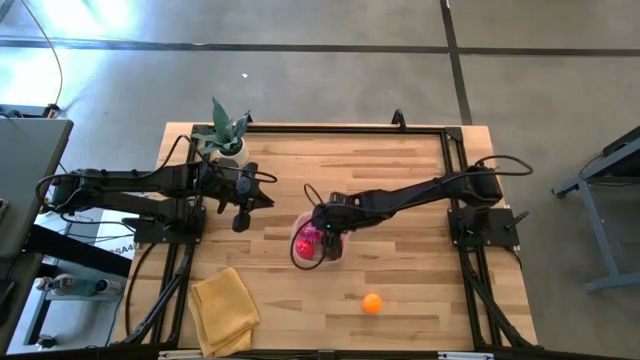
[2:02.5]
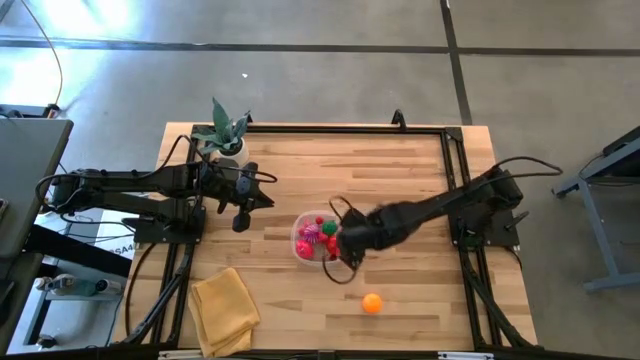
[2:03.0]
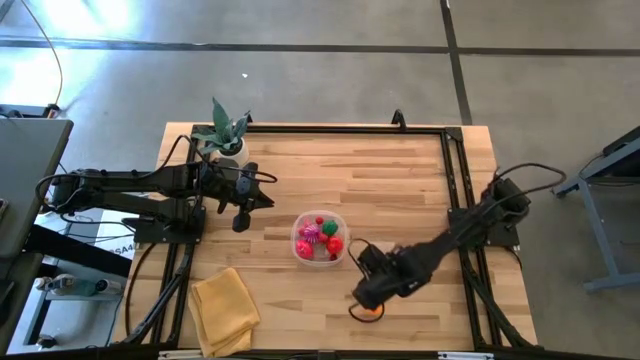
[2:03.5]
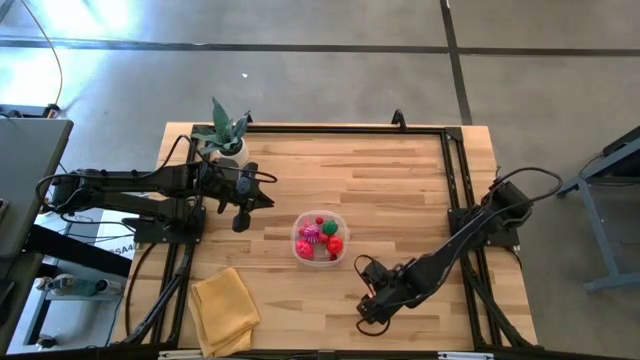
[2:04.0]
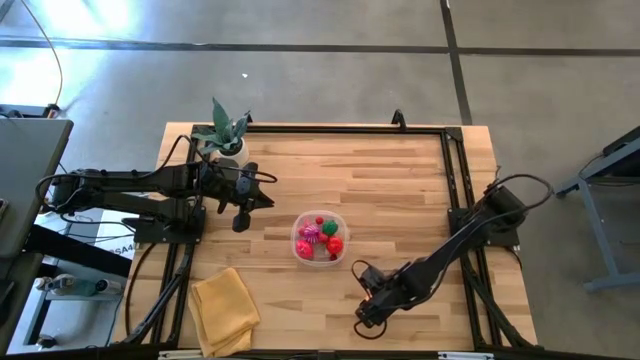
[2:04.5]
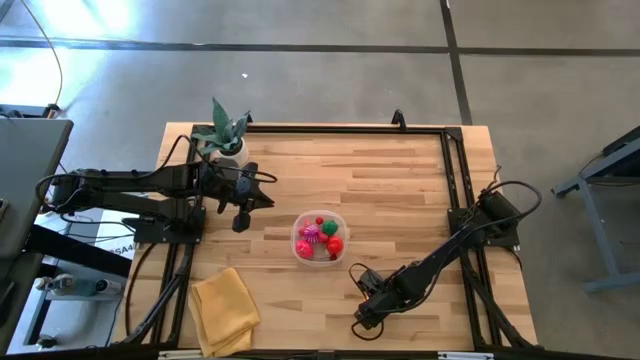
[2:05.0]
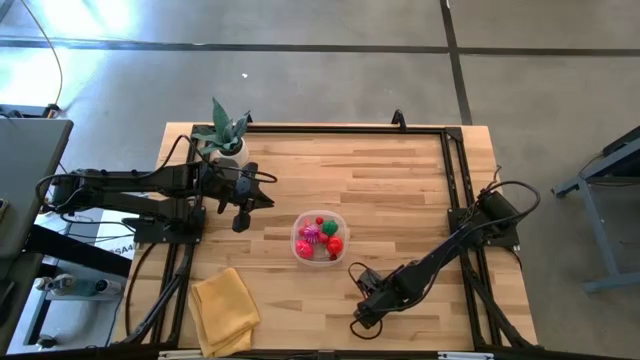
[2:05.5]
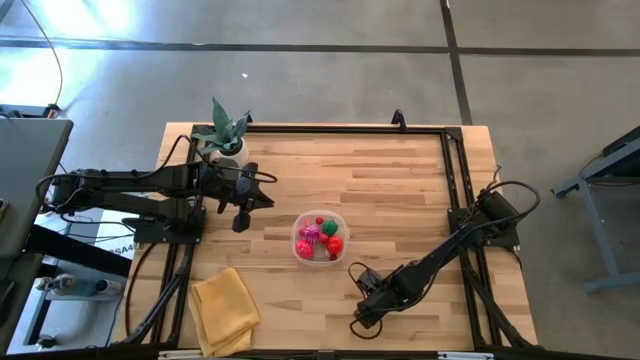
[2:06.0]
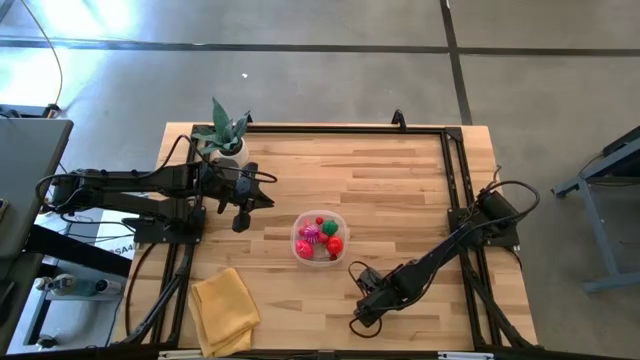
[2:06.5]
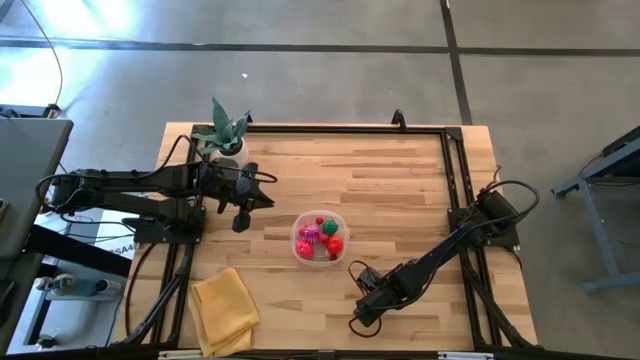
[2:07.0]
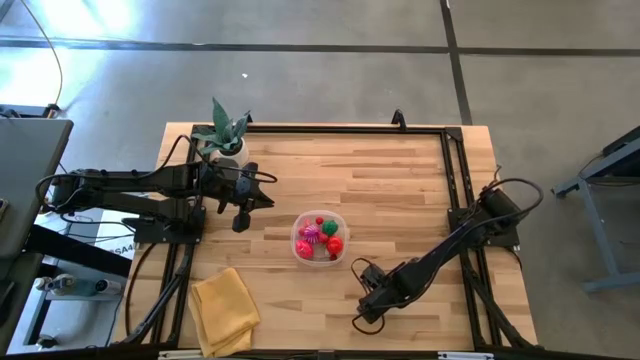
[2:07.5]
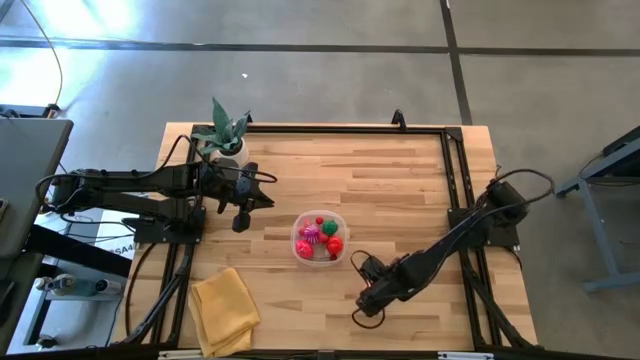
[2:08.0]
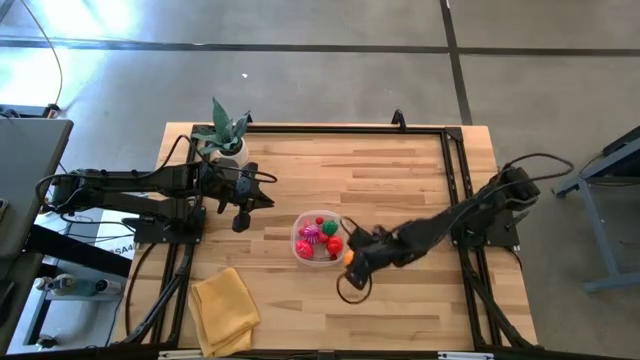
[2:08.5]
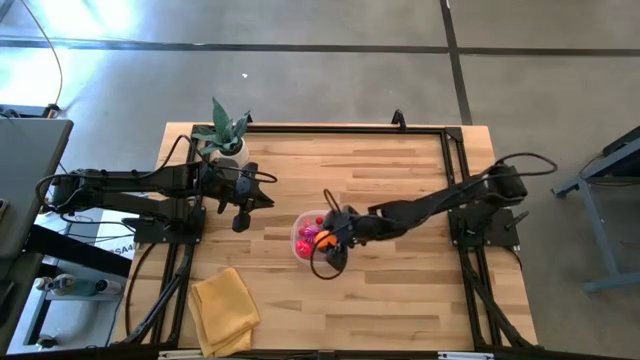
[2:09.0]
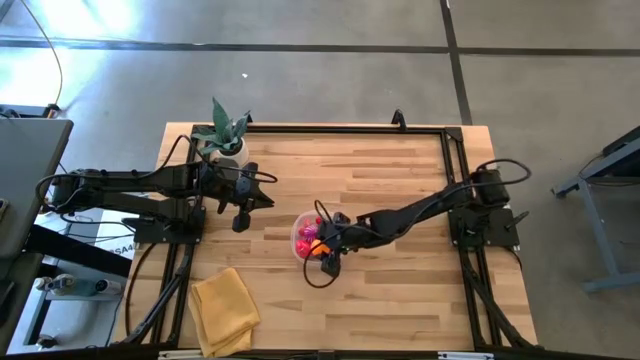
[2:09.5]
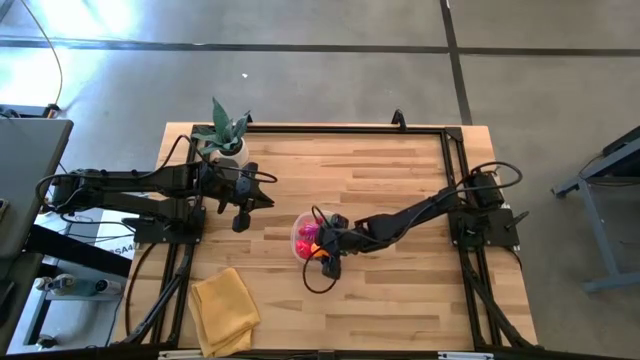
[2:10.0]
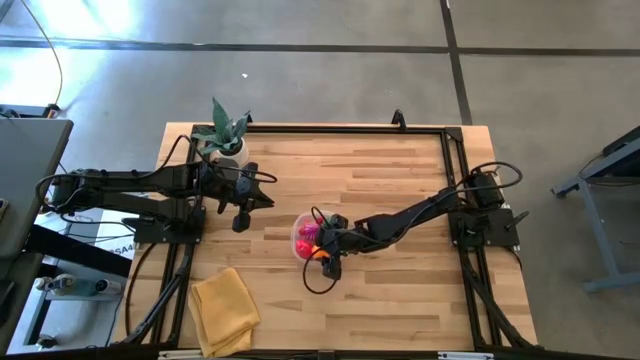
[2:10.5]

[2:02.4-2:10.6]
Task: Pick and placing Produce into tupperware
Put the orange into the transparent container

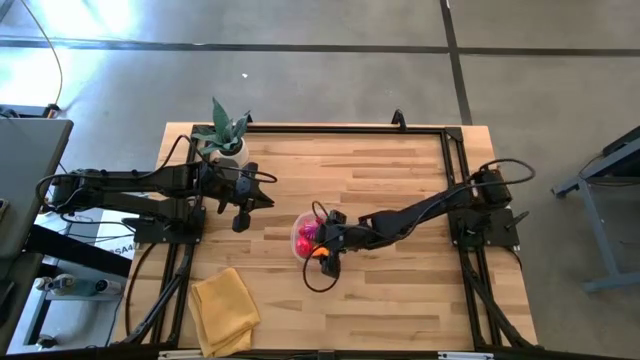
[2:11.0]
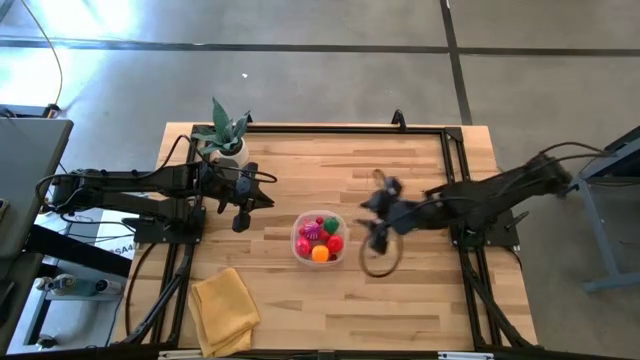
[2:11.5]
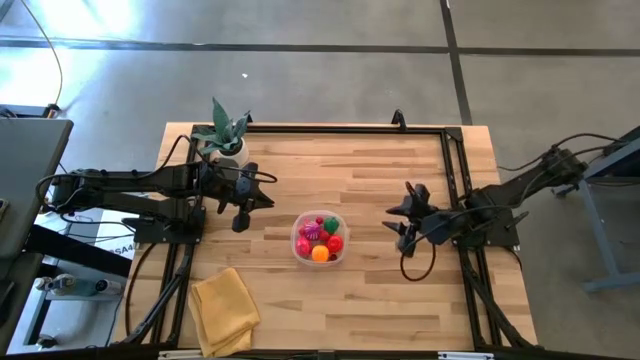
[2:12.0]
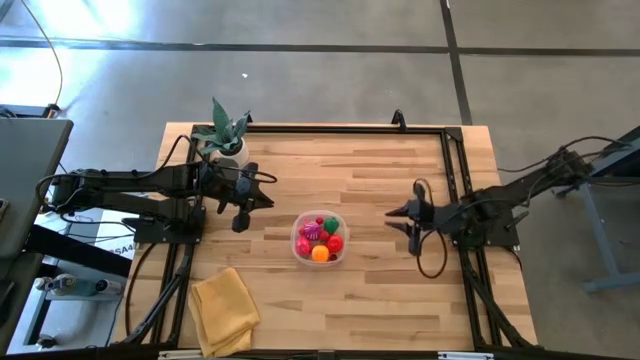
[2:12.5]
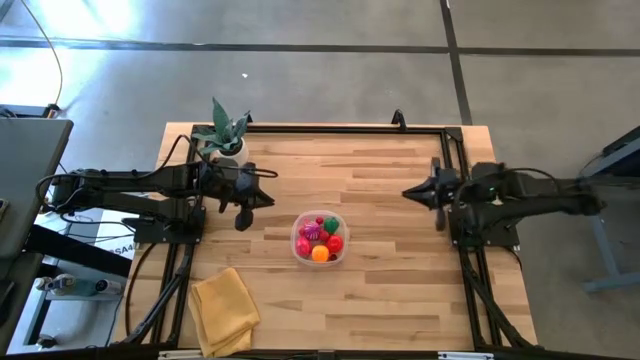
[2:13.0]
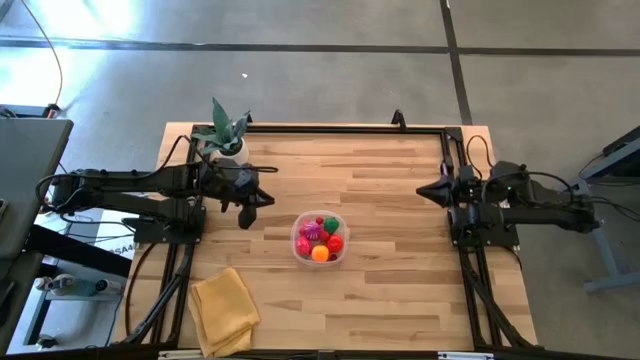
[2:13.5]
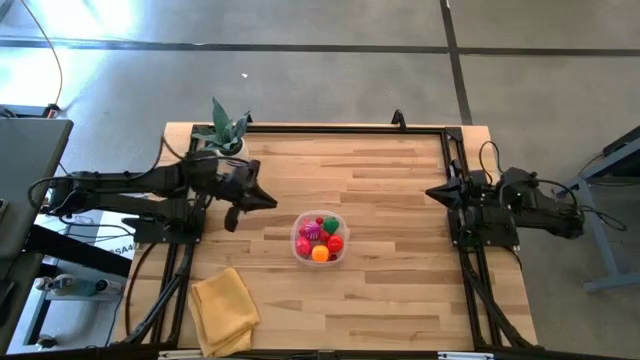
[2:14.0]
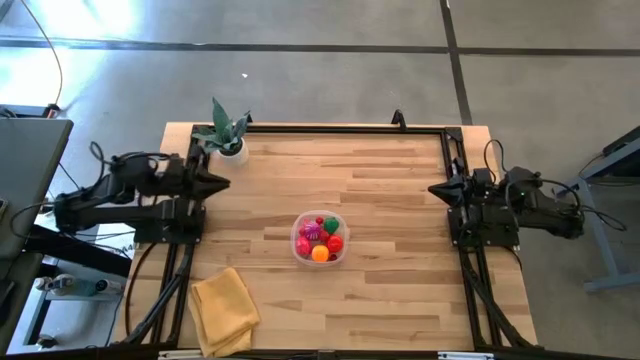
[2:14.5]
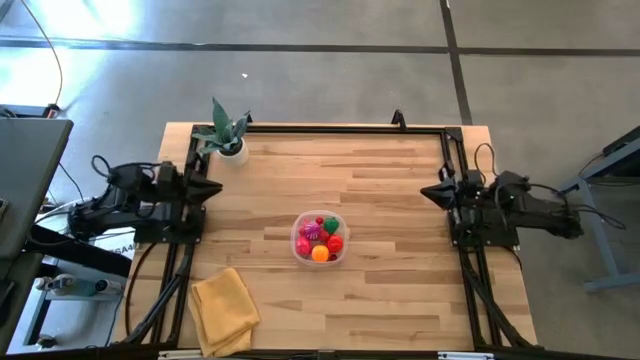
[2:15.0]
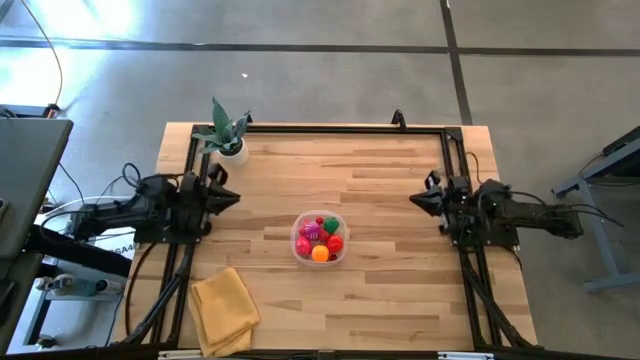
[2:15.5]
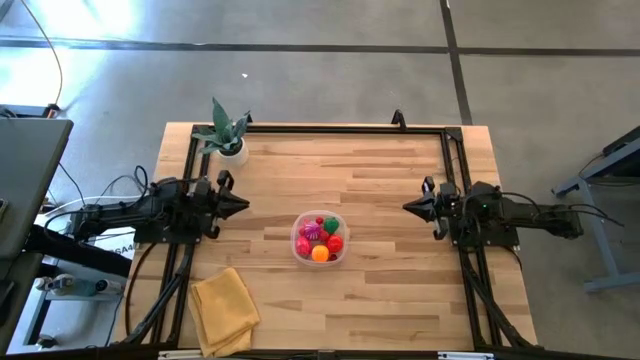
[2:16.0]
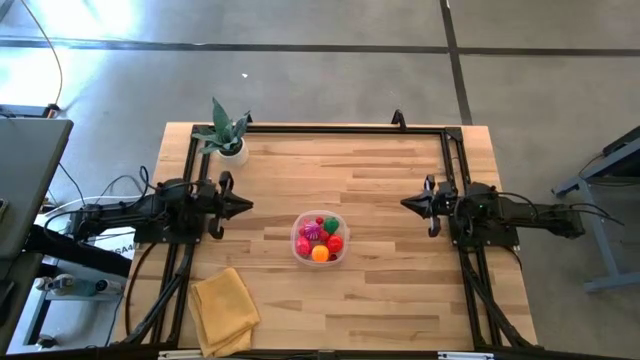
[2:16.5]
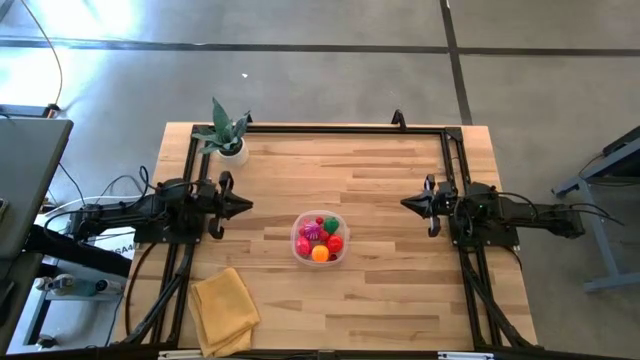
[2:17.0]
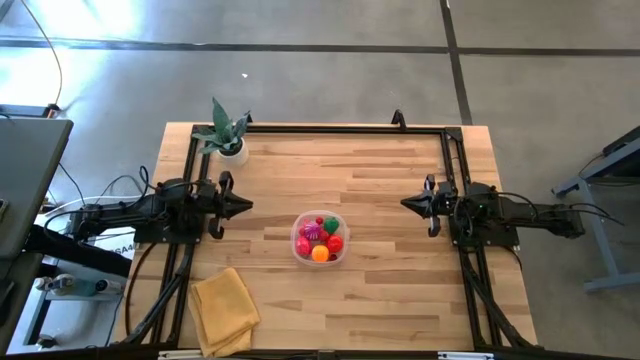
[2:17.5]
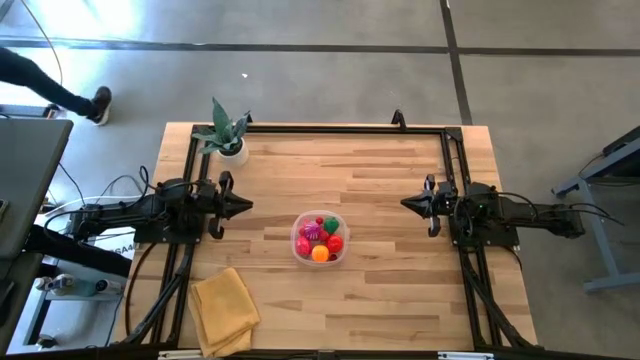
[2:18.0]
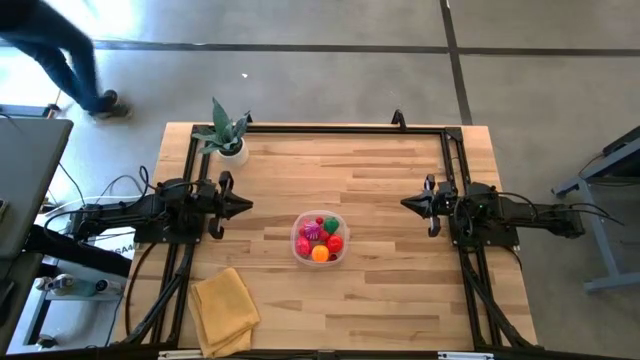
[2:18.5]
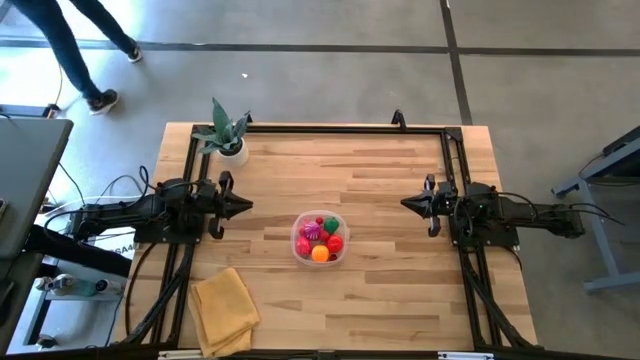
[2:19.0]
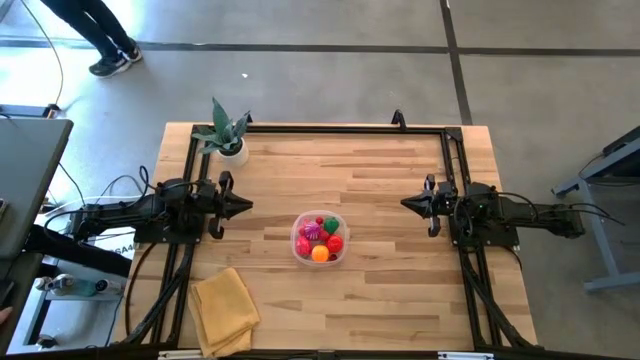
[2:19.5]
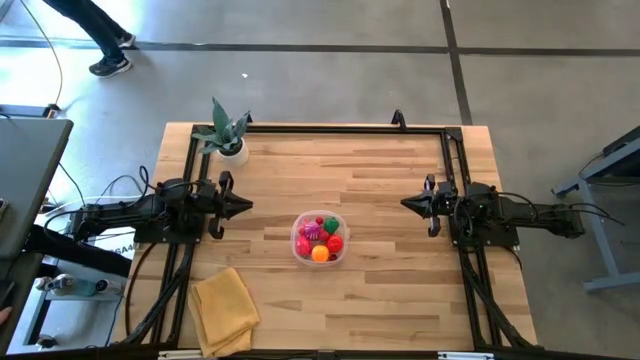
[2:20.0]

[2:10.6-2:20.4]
Return to Home Position
